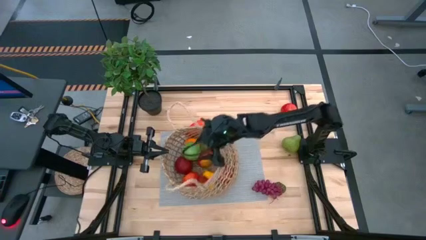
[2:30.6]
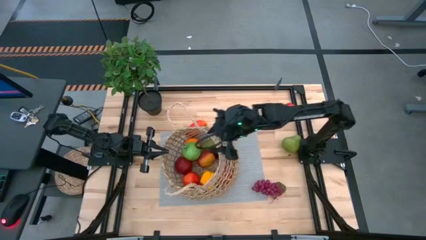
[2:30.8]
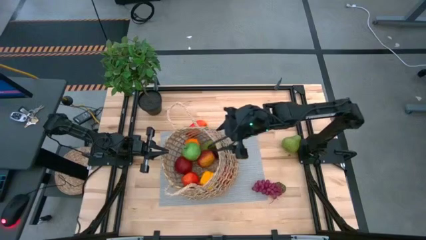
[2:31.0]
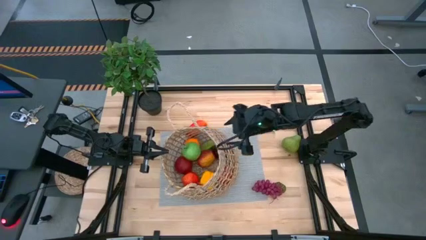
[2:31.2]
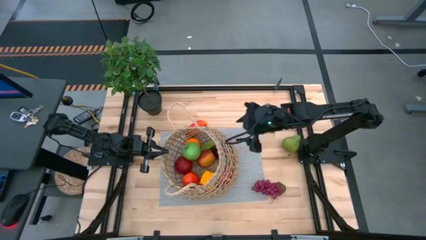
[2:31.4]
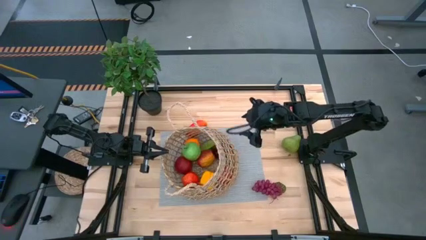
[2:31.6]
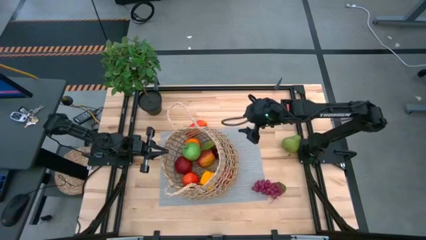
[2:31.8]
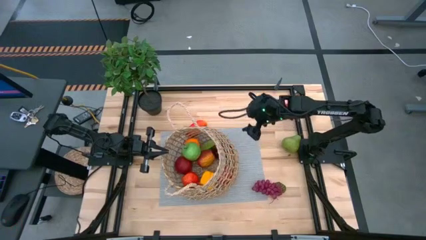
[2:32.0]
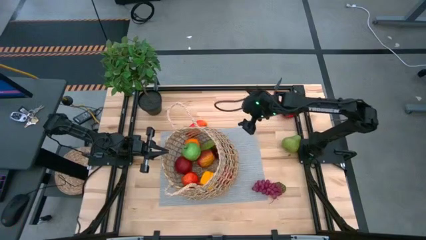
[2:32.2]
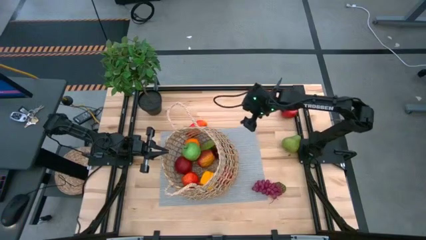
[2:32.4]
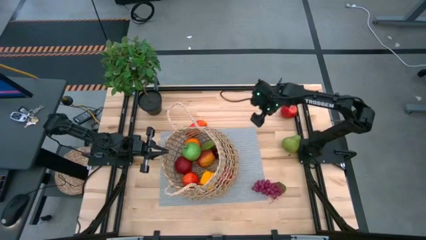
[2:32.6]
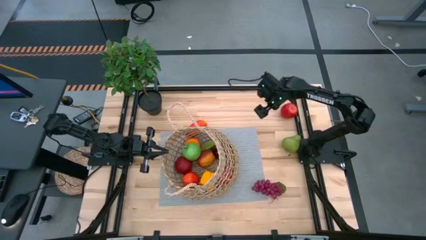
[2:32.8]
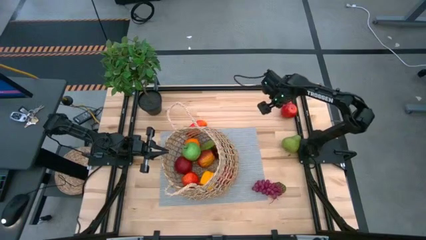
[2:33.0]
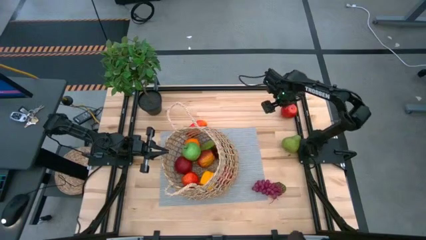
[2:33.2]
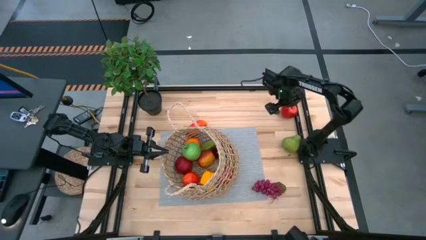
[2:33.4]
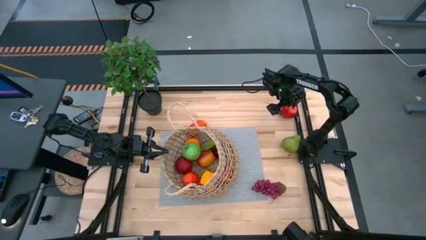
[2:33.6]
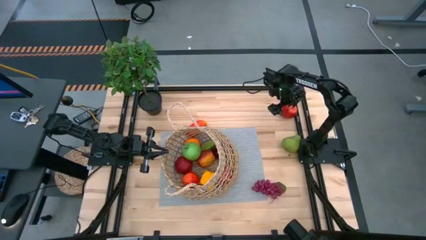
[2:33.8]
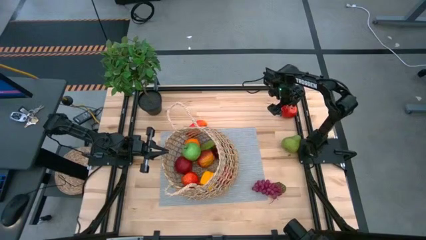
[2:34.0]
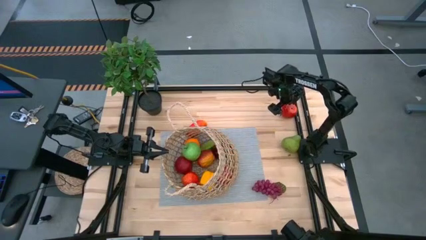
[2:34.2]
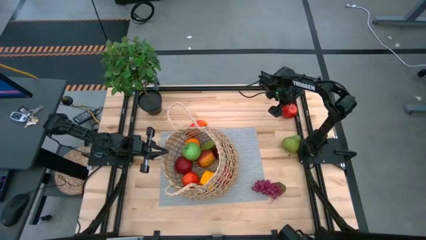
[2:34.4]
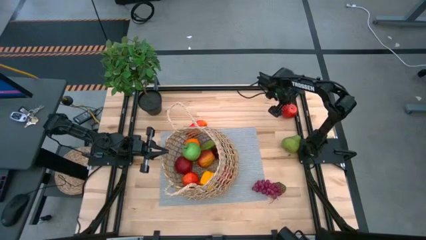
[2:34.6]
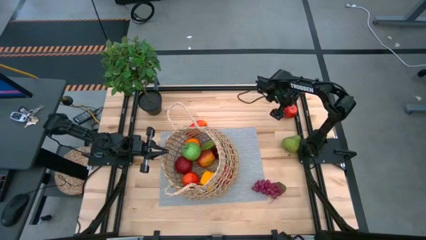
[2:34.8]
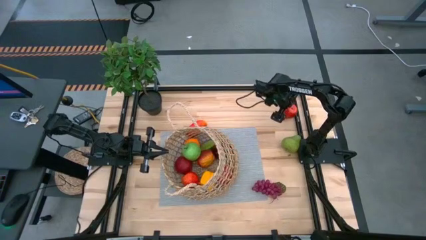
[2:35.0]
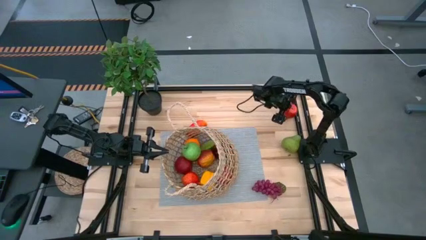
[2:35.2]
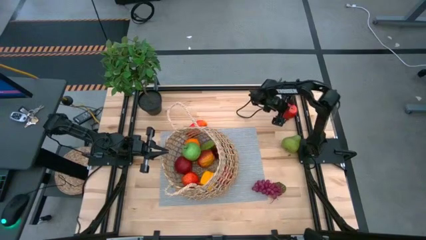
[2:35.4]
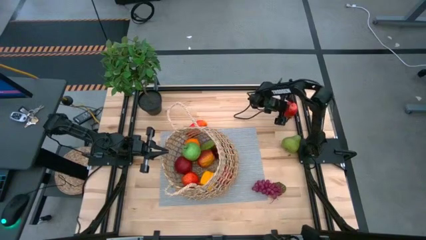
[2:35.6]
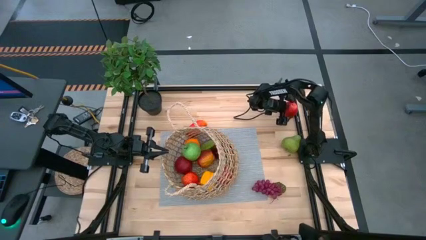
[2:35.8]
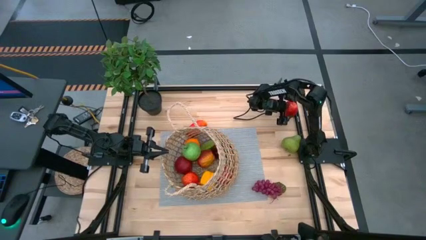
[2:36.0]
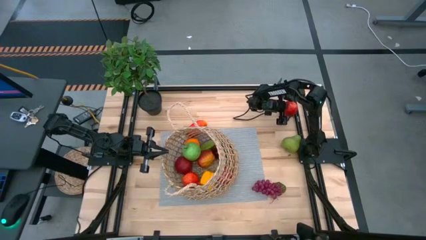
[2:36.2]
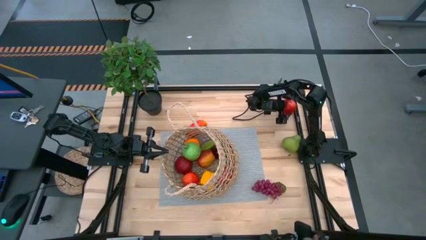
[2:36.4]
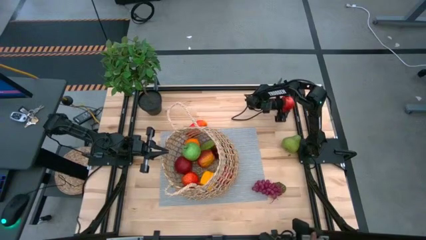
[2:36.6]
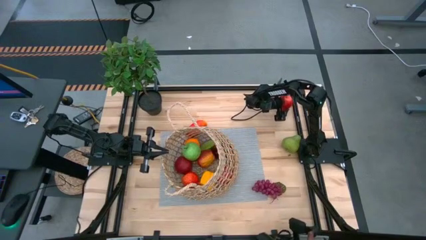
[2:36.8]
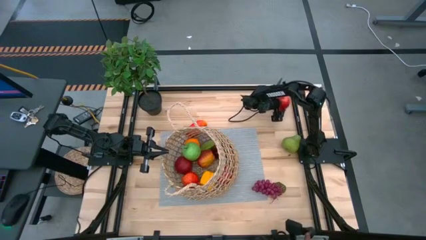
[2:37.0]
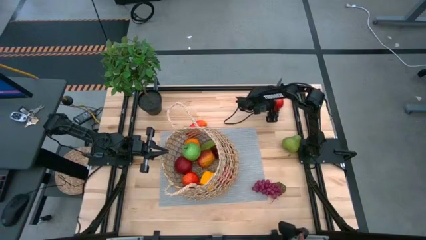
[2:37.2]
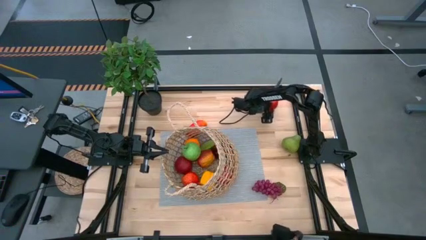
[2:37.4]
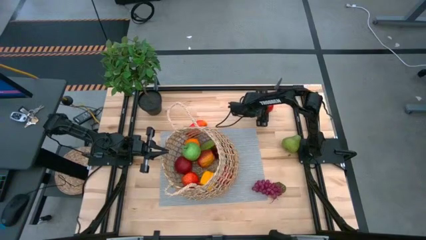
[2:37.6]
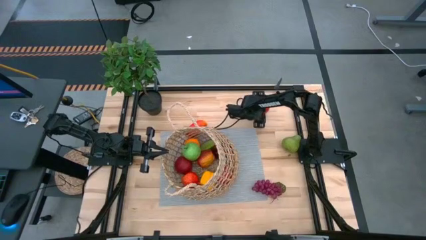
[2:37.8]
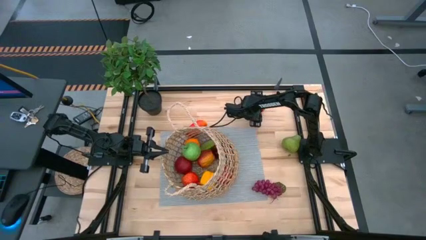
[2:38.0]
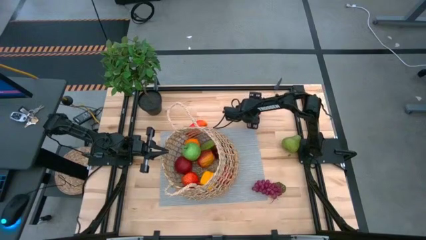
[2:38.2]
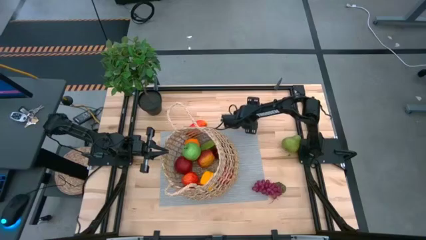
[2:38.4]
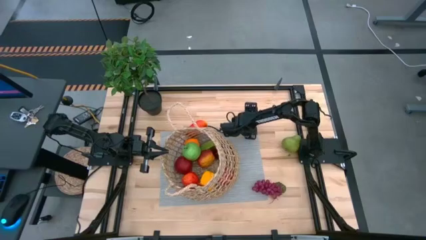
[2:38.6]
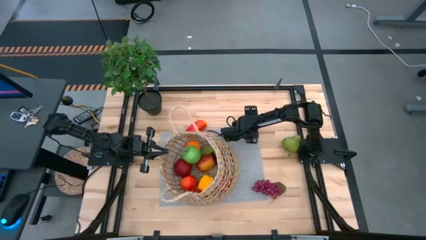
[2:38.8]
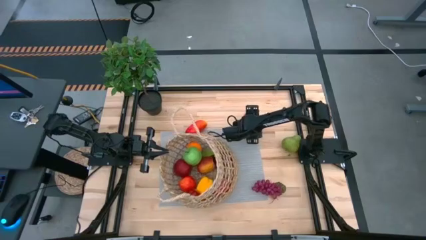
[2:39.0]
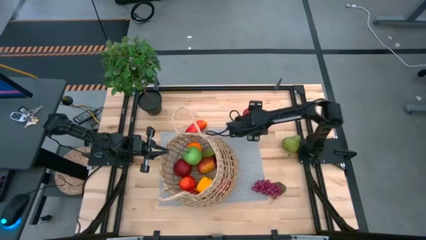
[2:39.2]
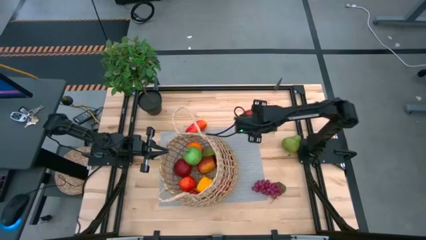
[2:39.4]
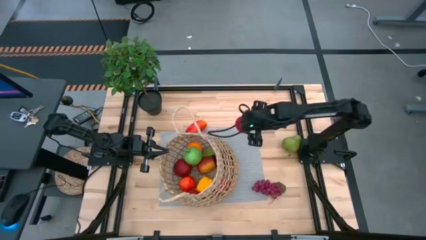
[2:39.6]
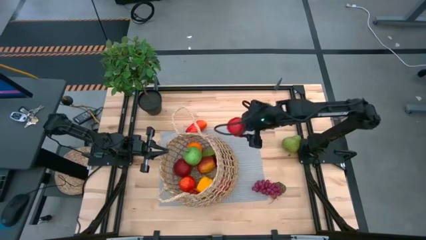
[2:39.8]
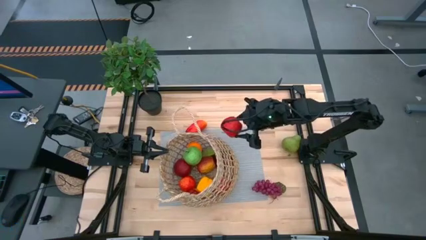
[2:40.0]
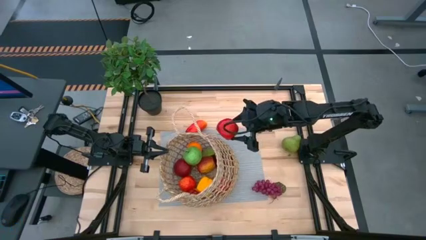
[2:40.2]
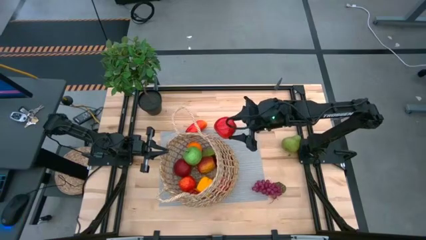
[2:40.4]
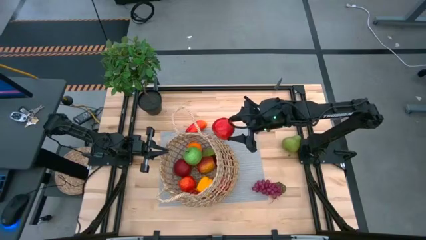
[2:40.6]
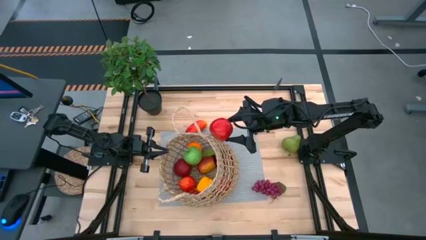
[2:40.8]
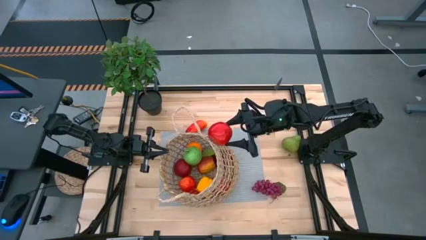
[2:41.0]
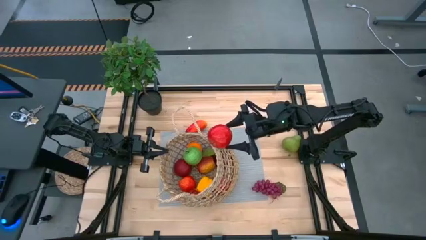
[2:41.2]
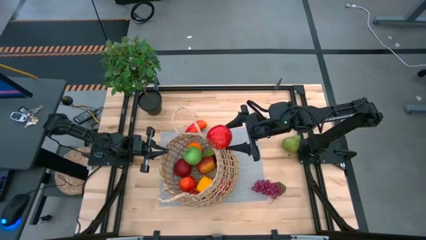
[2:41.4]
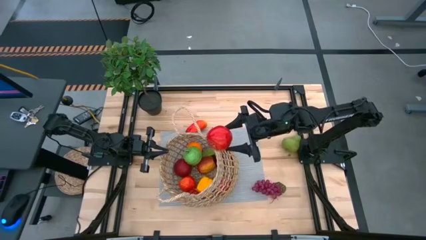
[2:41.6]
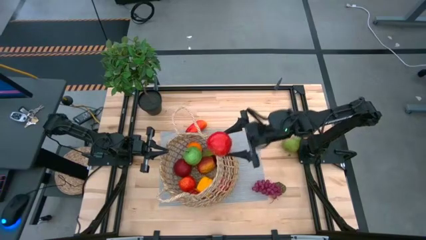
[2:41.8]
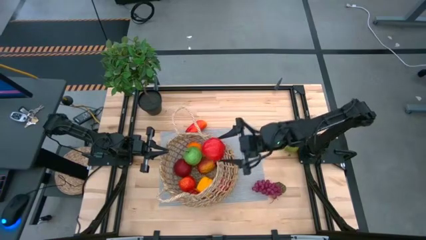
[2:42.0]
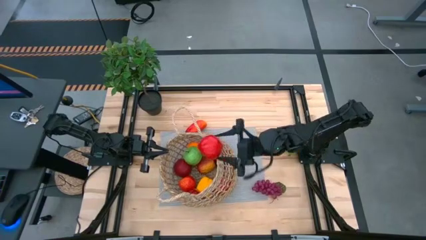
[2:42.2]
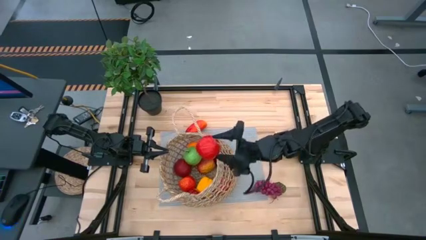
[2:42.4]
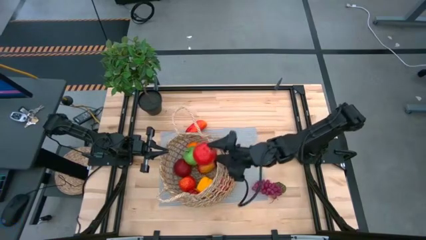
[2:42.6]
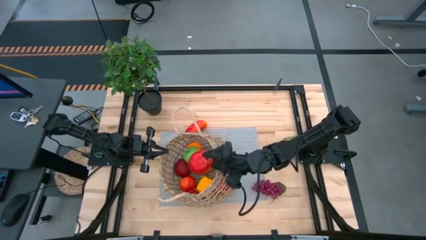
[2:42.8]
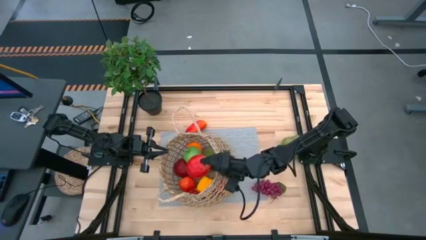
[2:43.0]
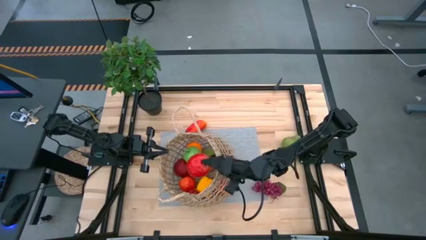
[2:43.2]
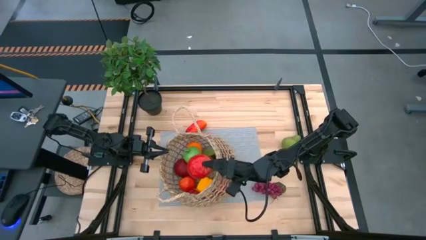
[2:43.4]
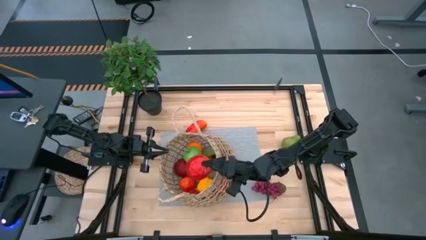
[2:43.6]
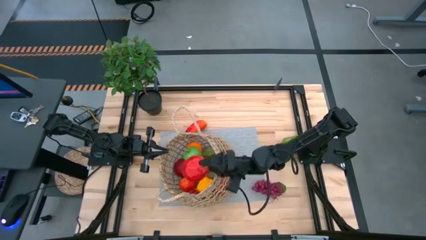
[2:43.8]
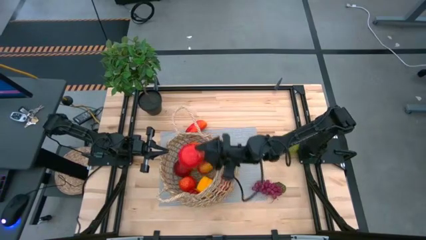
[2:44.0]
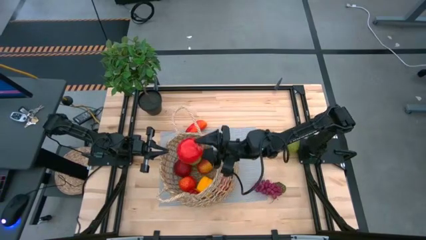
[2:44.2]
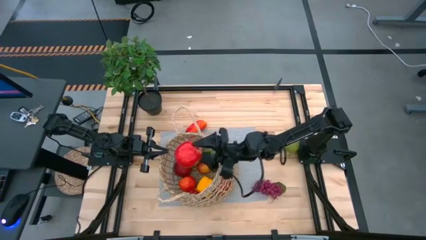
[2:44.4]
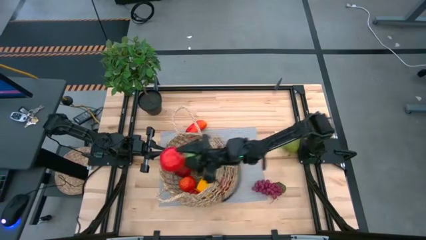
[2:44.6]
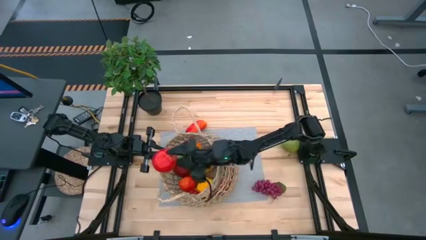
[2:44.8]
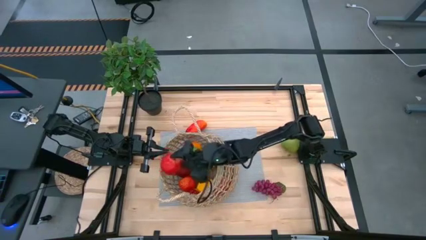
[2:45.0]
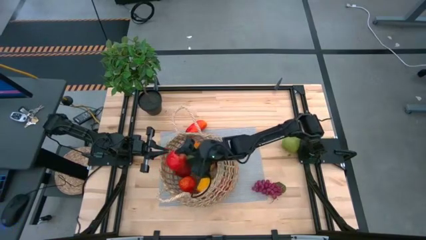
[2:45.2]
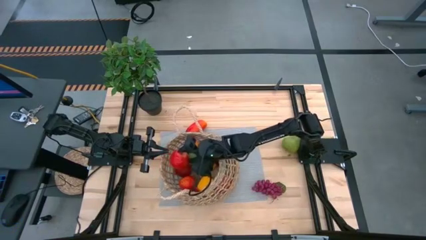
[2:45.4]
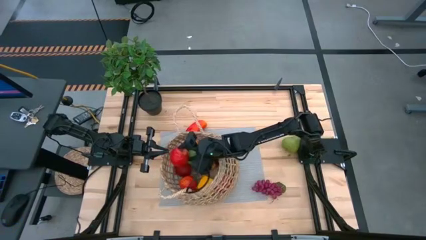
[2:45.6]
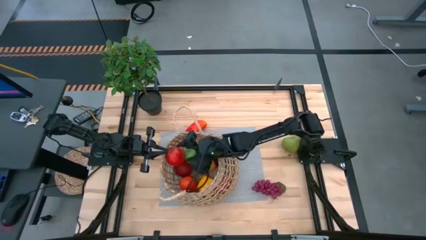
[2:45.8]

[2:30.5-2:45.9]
Task: Build produce basket
Put the red apple into the brown woven basket
